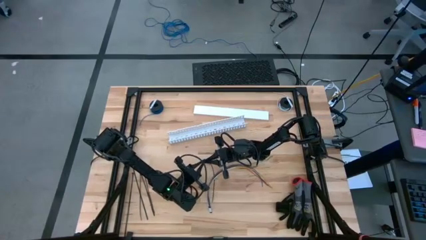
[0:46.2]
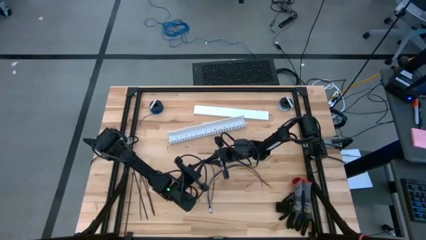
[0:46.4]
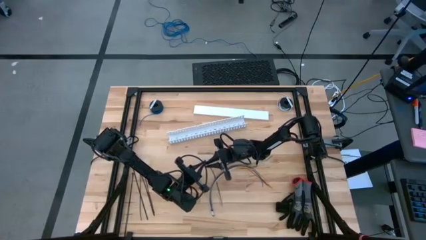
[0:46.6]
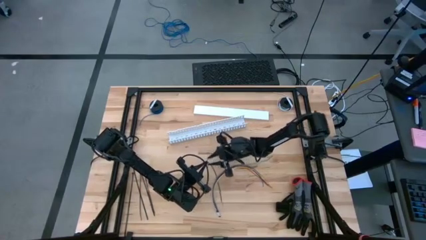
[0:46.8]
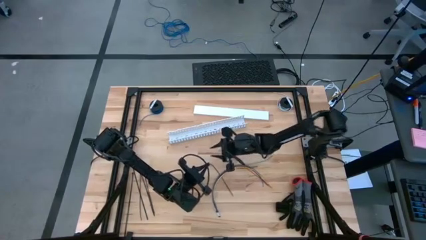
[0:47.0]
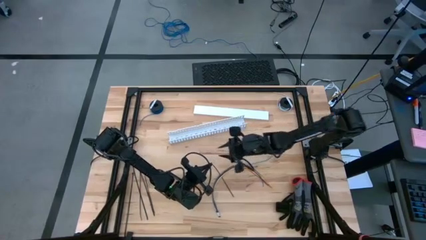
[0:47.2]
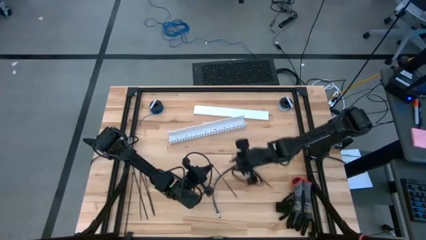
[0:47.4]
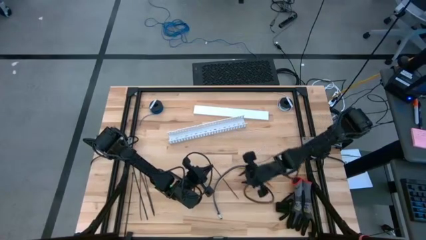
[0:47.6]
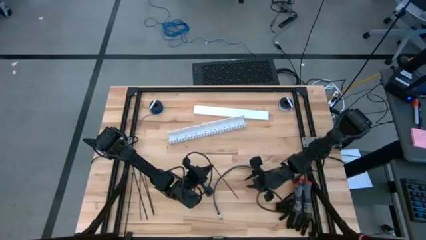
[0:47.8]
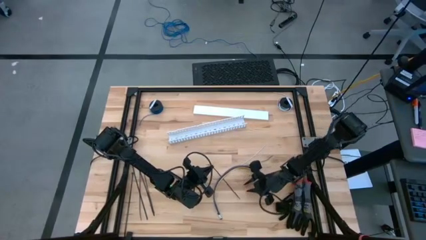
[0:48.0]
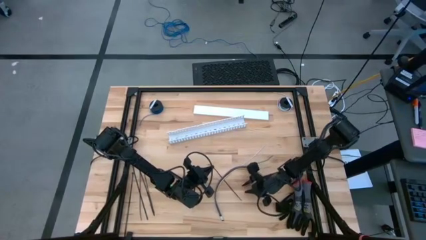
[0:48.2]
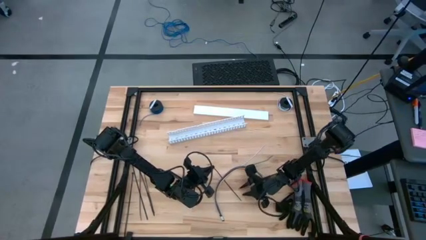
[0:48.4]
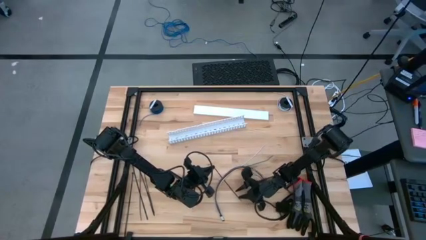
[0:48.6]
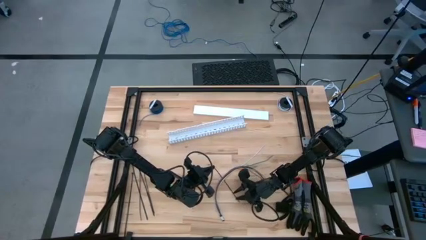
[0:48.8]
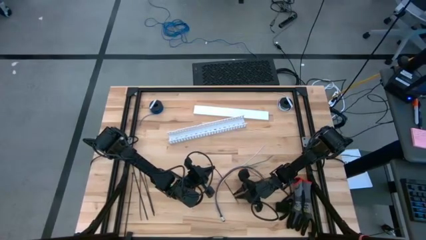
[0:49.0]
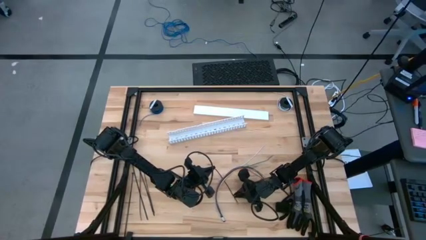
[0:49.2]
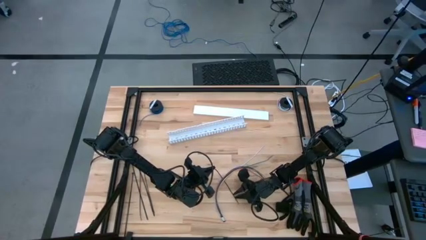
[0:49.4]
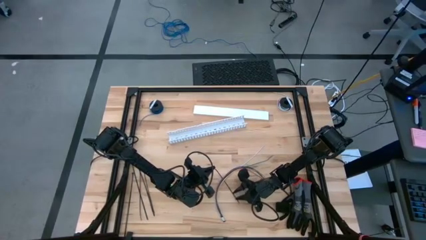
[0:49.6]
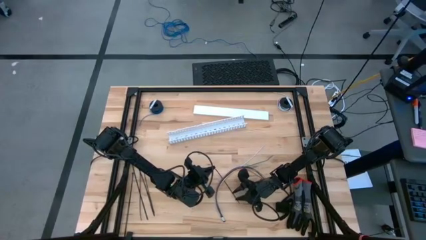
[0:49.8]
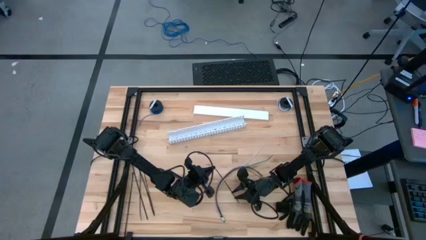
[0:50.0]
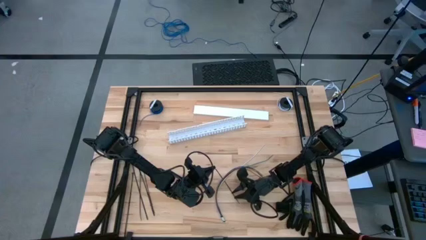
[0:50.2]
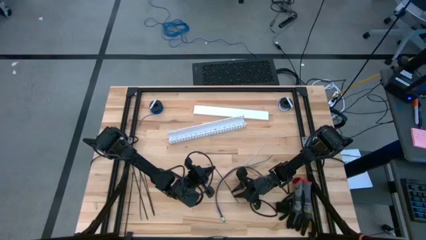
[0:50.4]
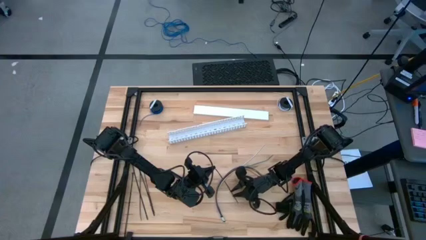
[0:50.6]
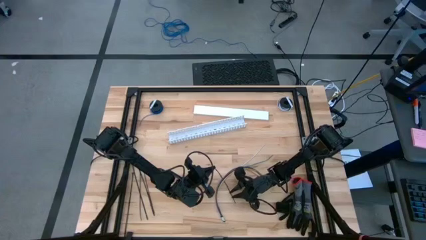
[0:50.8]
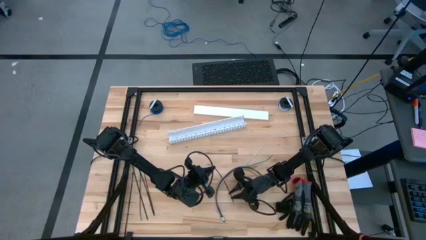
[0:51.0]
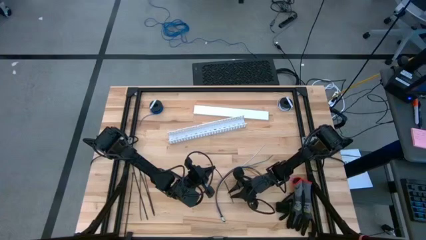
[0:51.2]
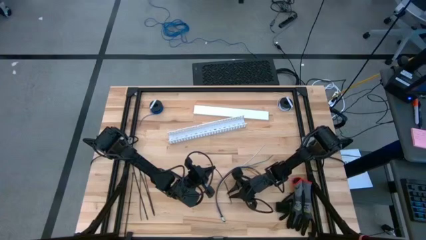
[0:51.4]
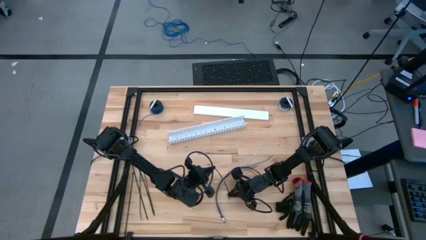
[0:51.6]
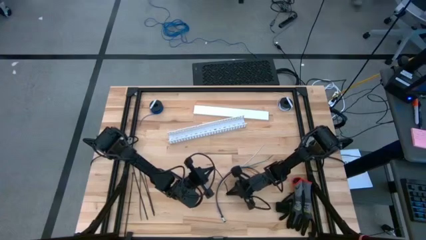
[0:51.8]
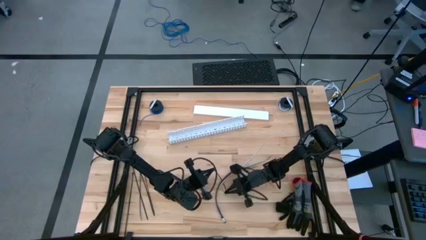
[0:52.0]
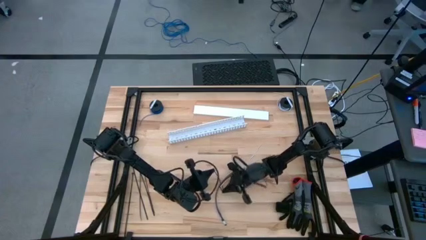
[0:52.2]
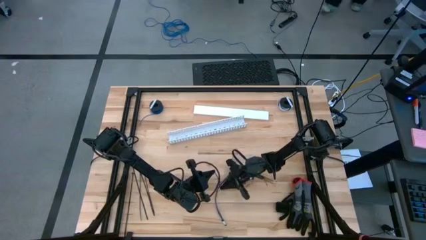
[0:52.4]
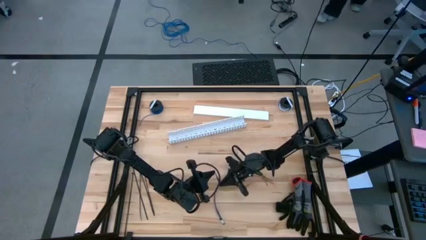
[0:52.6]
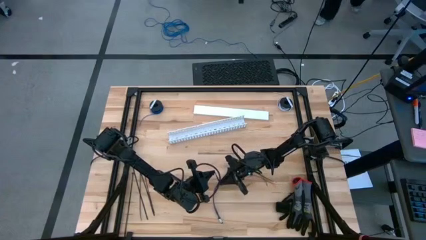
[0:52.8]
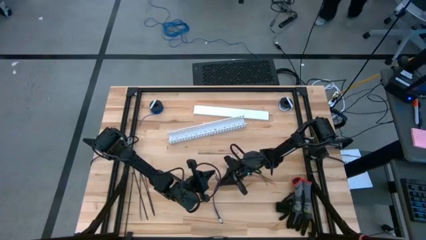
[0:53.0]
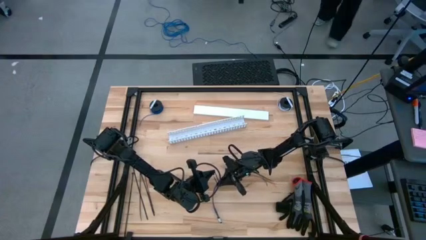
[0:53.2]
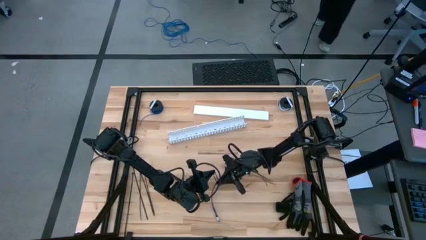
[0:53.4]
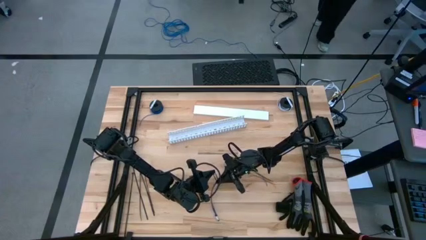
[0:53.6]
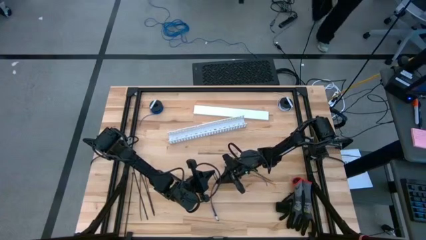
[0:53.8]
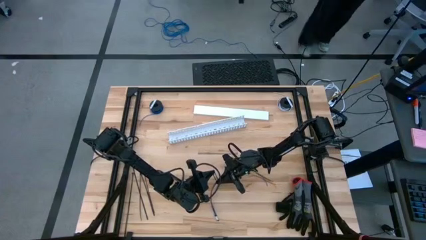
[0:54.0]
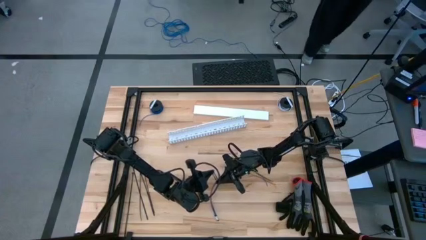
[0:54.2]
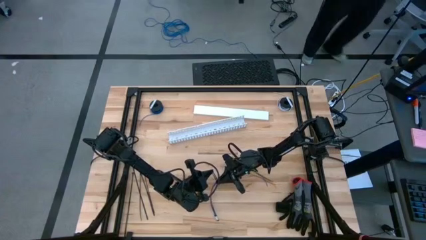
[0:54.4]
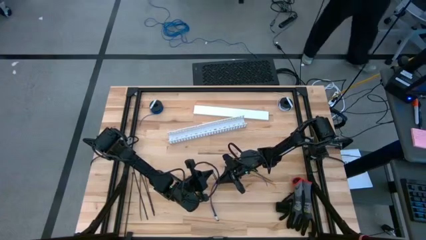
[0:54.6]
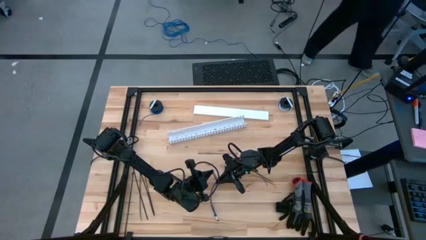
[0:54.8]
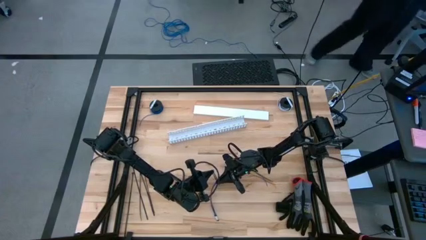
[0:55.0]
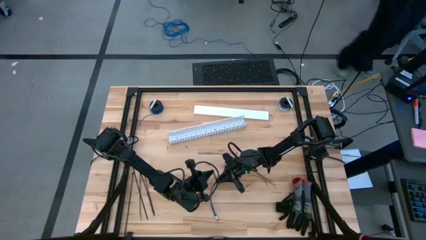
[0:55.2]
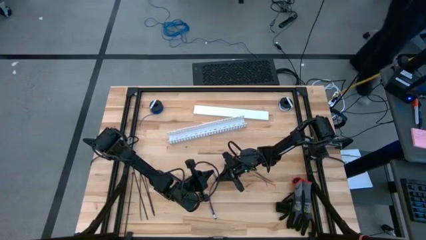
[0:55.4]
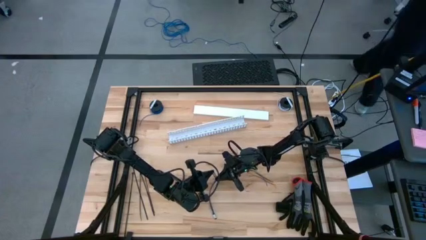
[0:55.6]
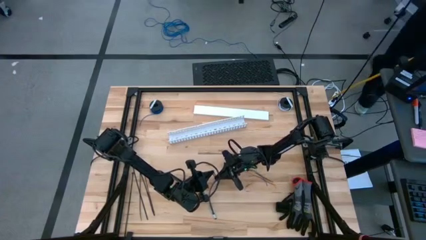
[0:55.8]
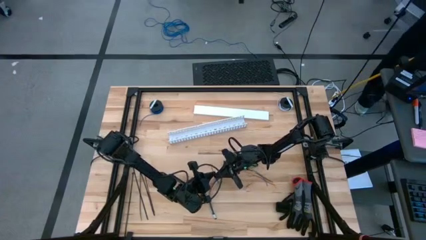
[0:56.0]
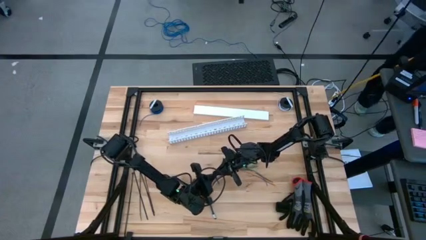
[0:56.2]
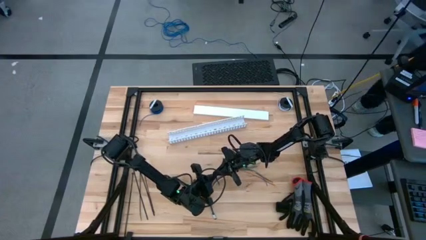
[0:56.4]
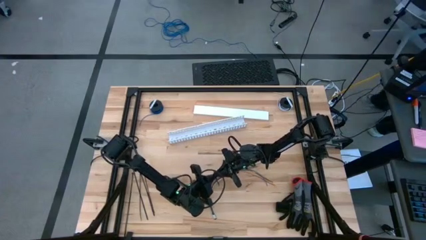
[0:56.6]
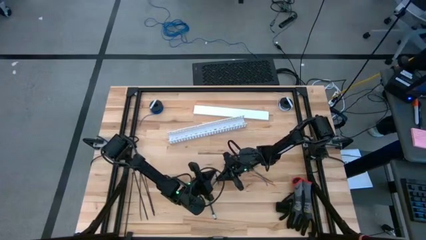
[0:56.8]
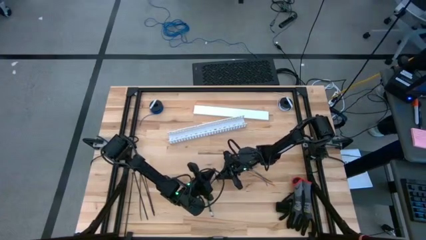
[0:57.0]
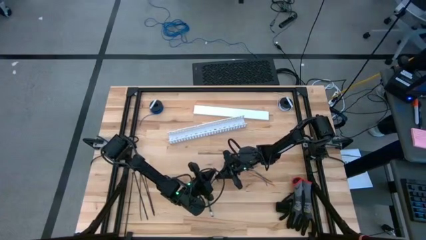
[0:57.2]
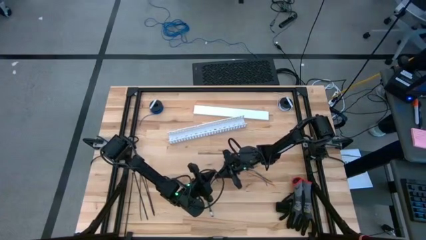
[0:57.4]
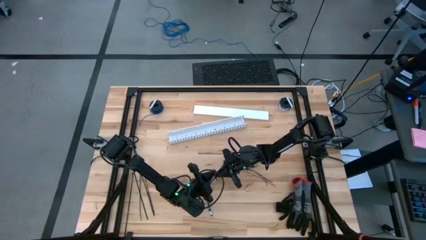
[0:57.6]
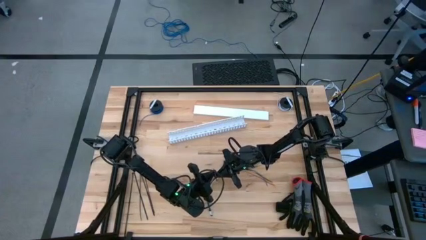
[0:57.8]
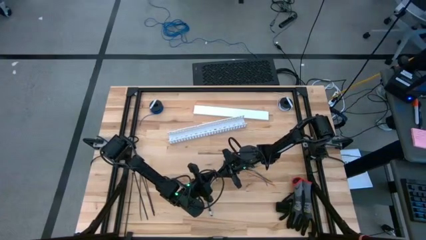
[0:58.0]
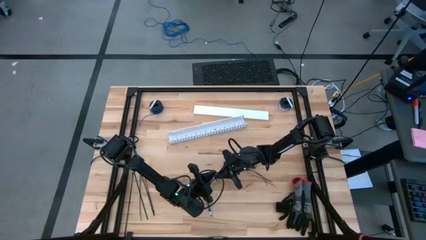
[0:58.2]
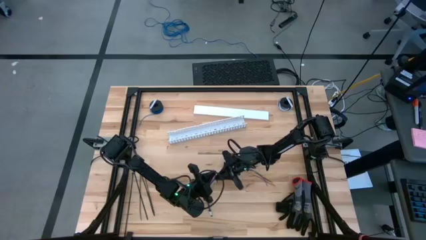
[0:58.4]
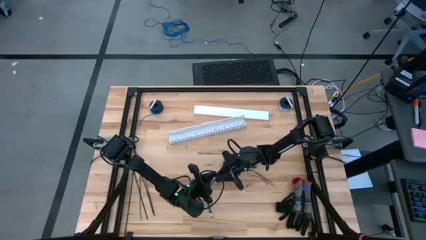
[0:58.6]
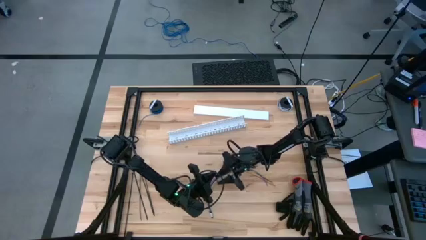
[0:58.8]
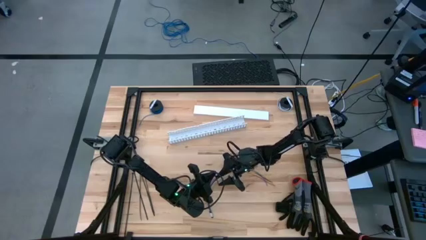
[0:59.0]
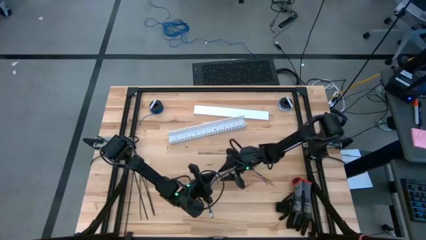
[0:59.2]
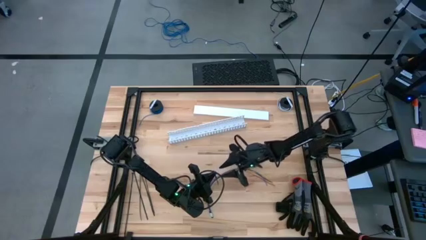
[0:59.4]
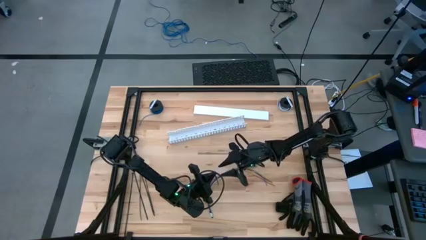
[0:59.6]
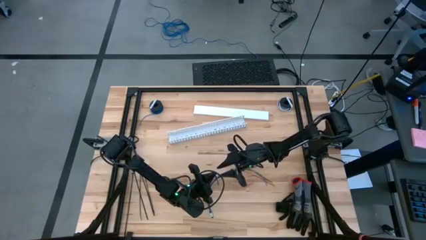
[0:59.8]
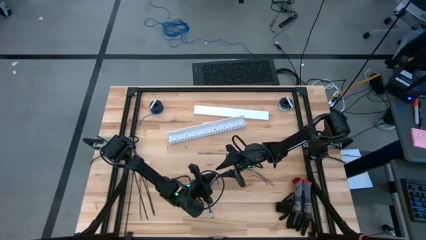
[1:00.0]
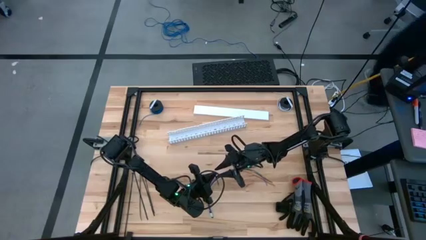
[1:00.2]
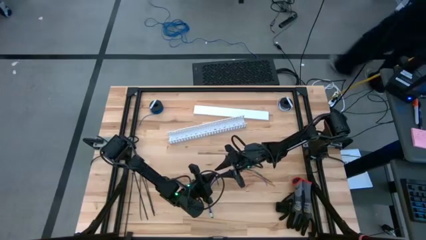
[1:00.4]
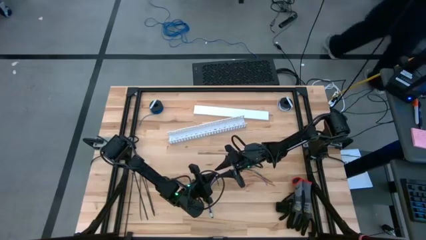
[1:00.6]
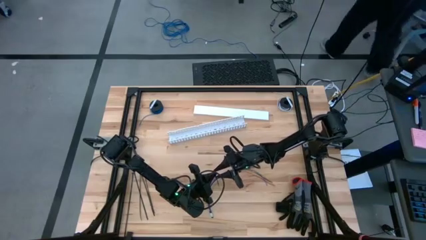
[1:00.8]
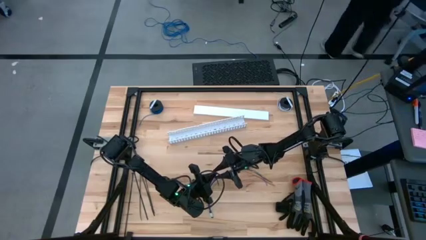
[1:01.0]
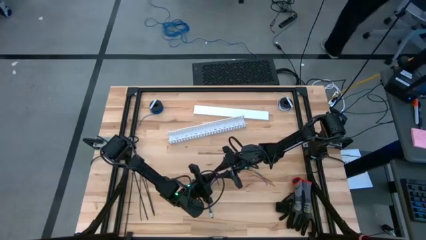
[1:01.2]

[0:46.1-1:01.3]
Task: Ziptie cables
Wrap the colored loose cables with the black zip tie
